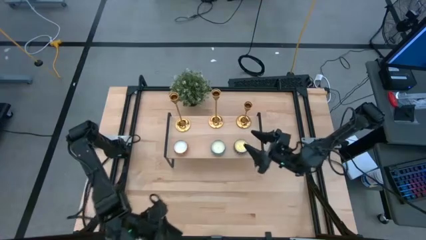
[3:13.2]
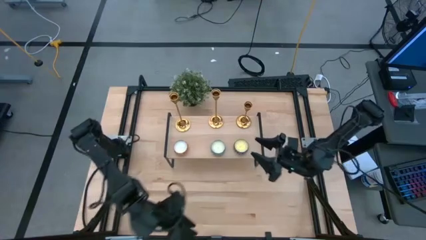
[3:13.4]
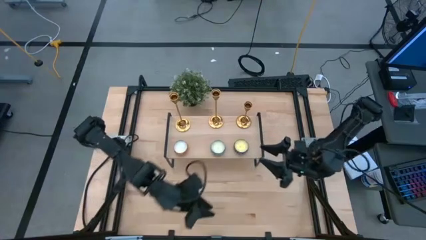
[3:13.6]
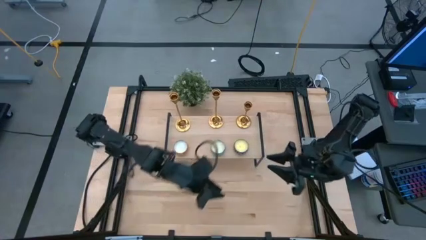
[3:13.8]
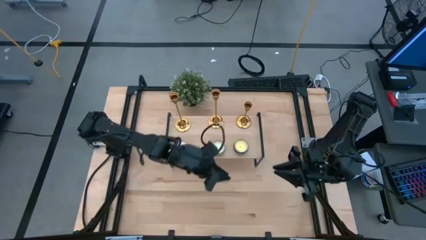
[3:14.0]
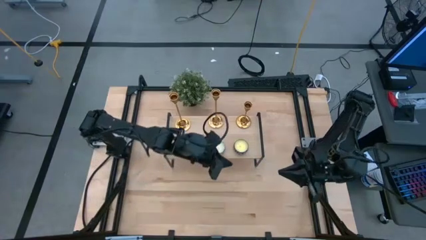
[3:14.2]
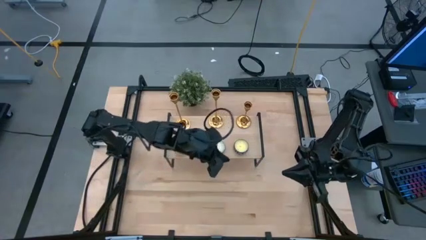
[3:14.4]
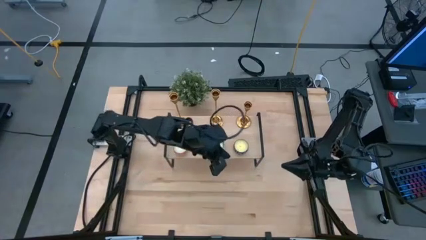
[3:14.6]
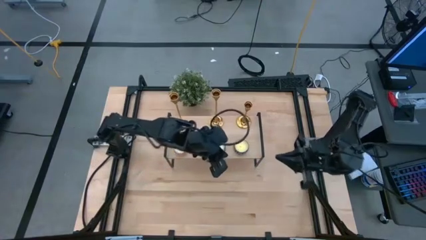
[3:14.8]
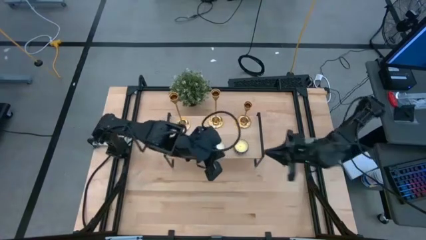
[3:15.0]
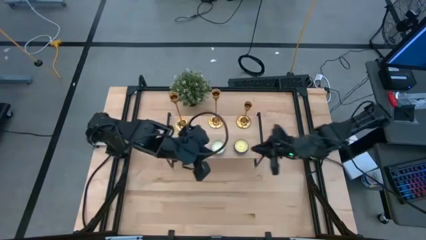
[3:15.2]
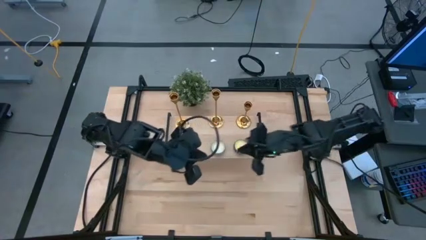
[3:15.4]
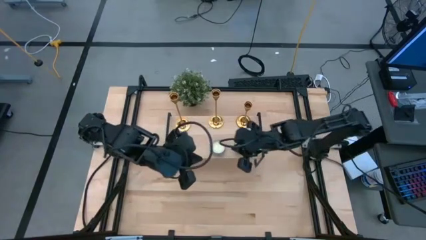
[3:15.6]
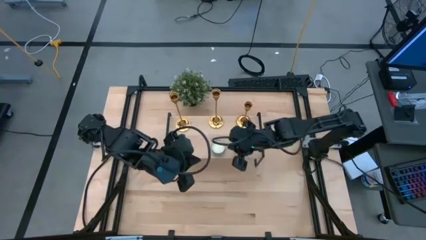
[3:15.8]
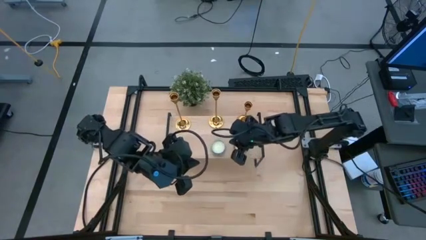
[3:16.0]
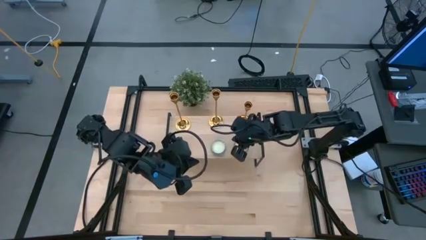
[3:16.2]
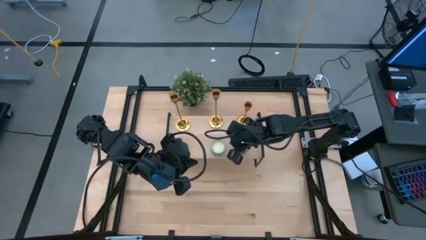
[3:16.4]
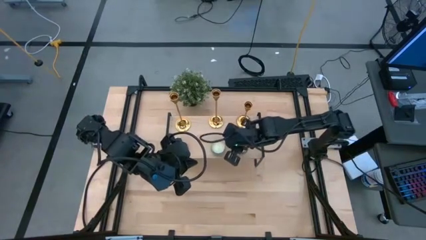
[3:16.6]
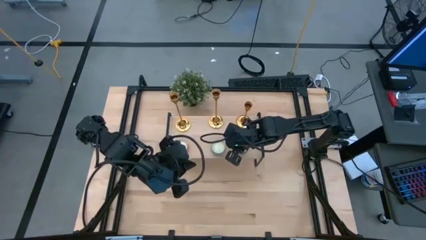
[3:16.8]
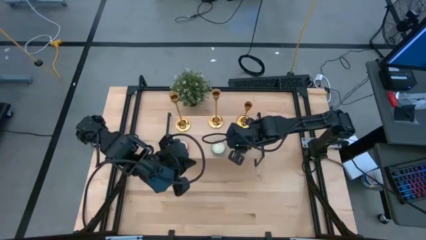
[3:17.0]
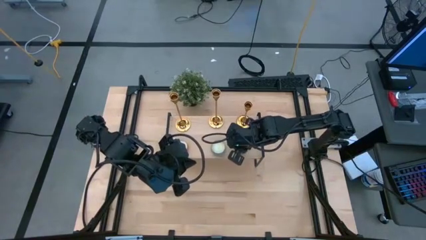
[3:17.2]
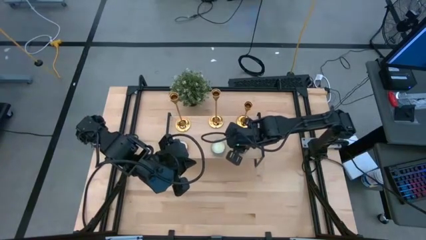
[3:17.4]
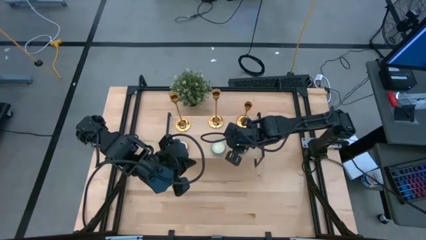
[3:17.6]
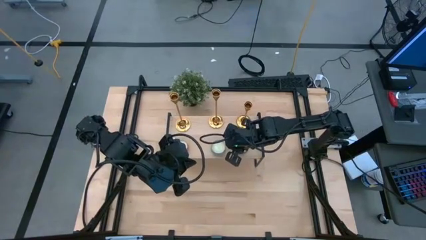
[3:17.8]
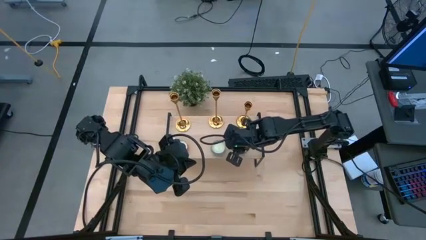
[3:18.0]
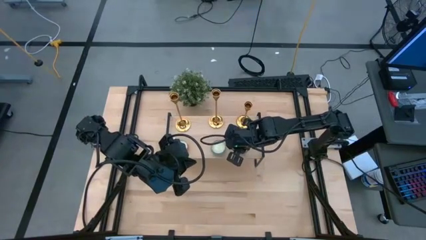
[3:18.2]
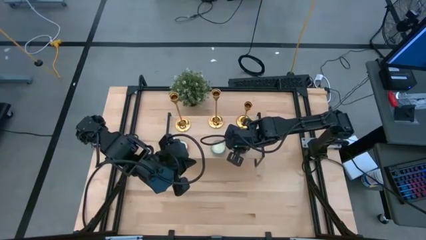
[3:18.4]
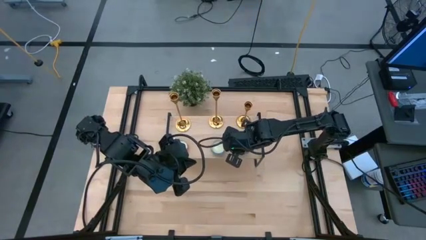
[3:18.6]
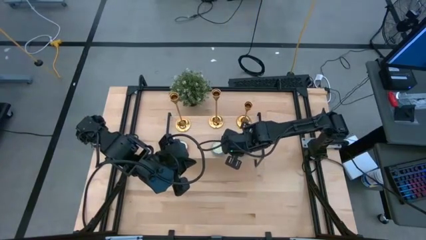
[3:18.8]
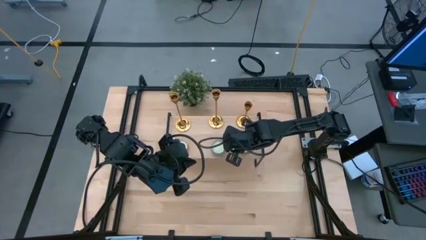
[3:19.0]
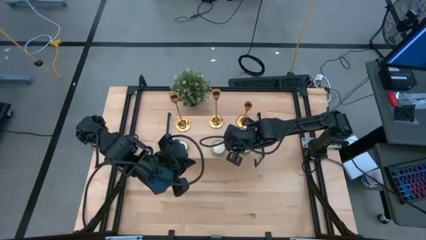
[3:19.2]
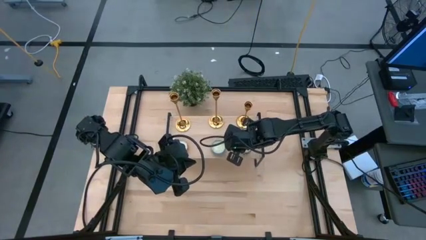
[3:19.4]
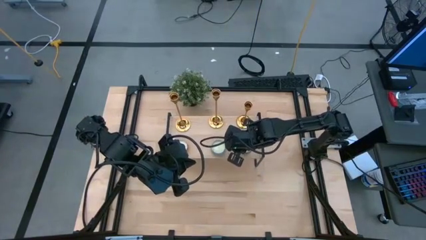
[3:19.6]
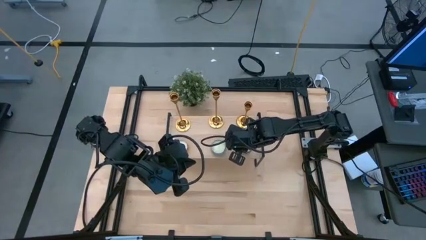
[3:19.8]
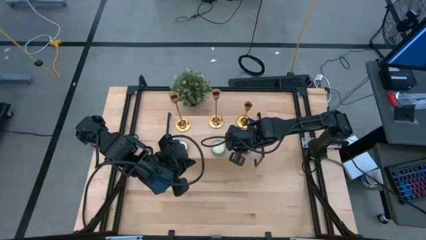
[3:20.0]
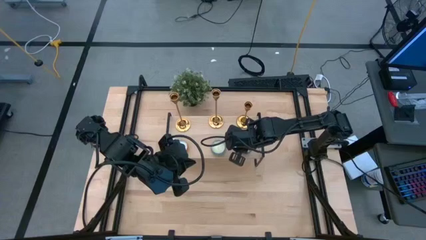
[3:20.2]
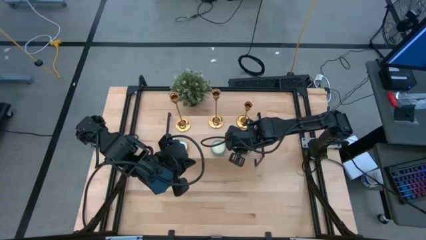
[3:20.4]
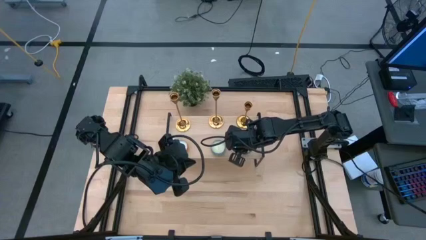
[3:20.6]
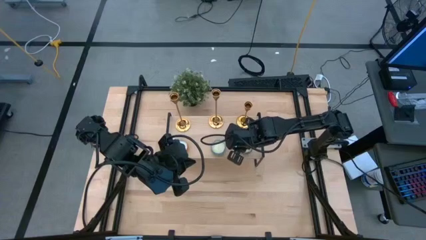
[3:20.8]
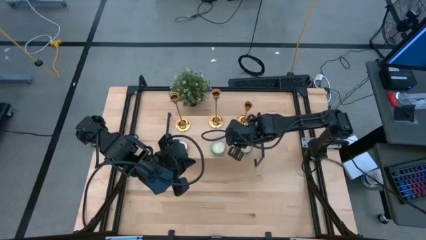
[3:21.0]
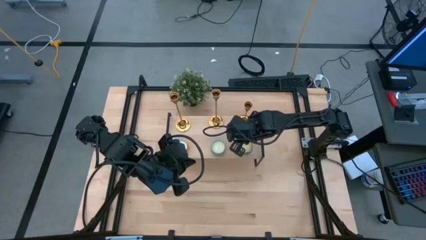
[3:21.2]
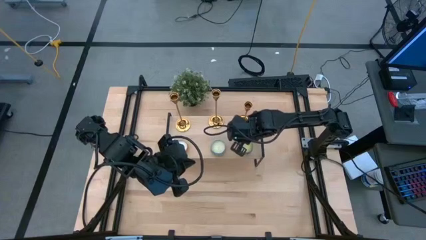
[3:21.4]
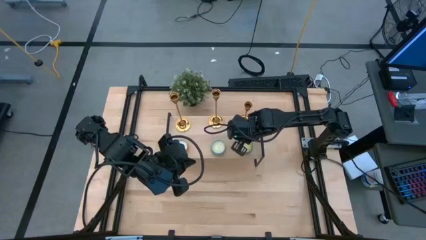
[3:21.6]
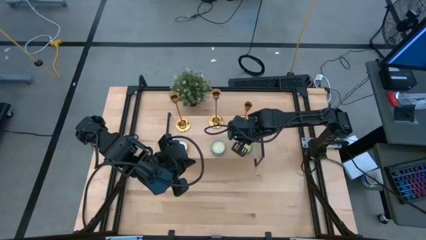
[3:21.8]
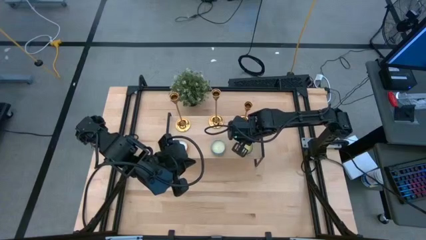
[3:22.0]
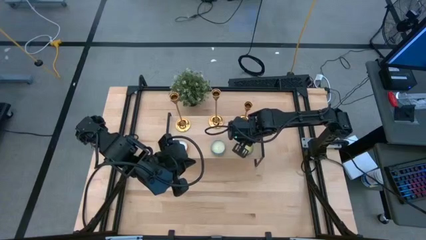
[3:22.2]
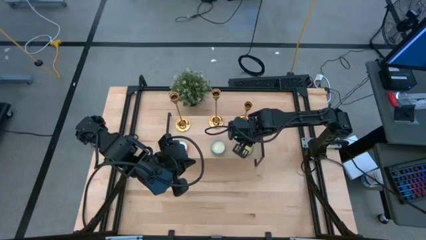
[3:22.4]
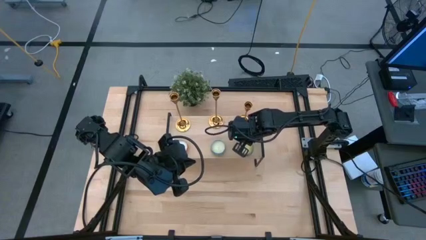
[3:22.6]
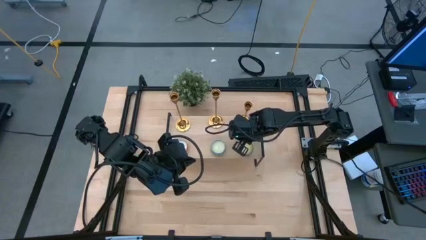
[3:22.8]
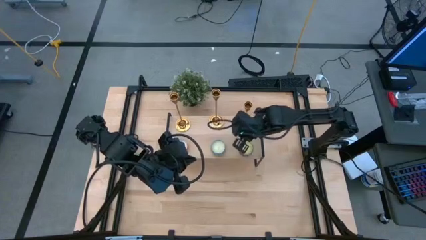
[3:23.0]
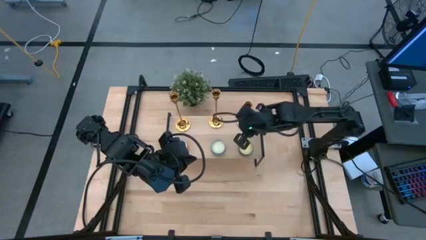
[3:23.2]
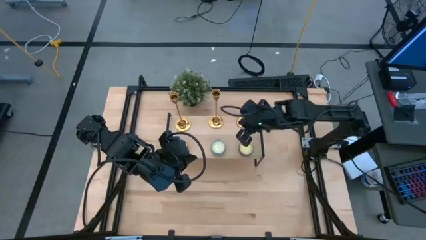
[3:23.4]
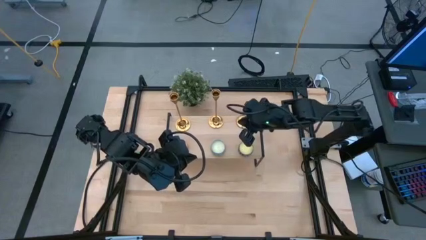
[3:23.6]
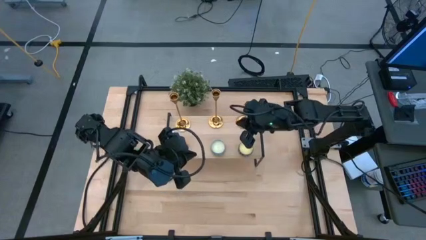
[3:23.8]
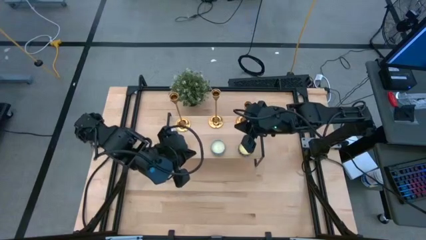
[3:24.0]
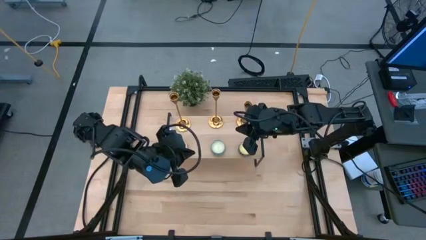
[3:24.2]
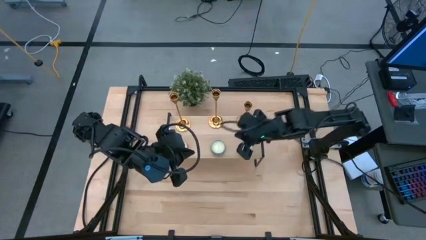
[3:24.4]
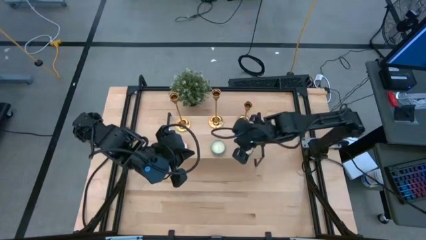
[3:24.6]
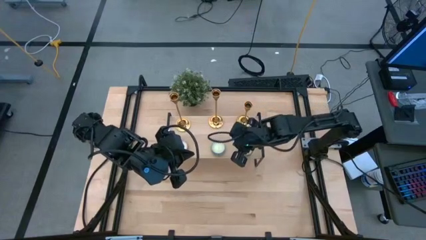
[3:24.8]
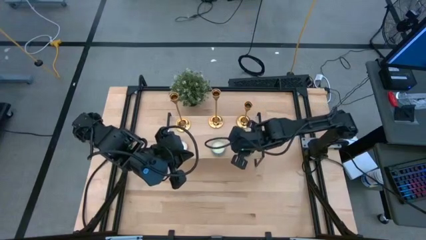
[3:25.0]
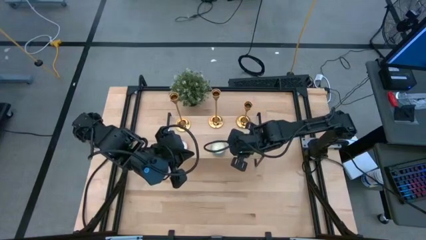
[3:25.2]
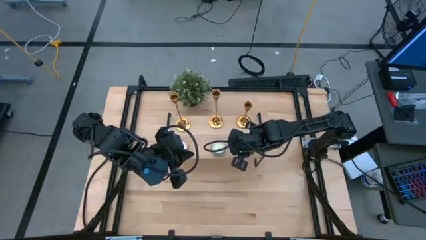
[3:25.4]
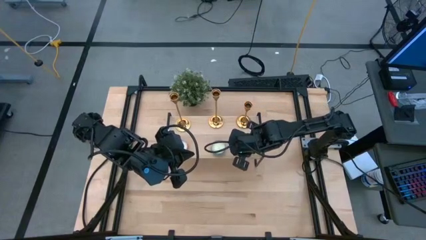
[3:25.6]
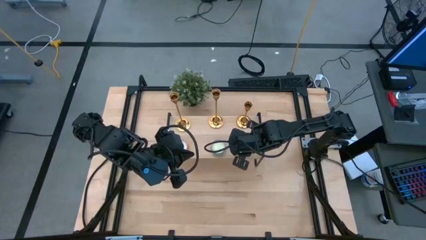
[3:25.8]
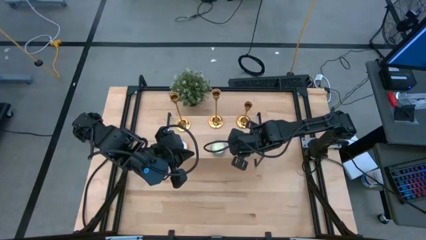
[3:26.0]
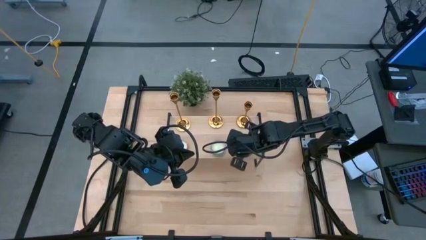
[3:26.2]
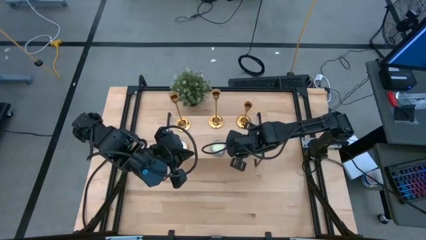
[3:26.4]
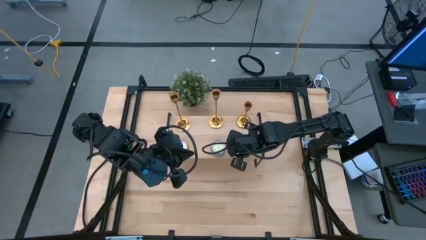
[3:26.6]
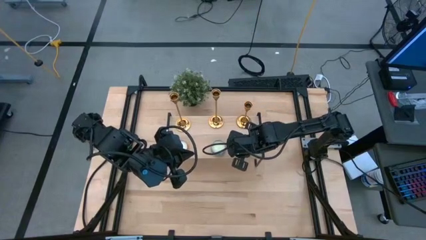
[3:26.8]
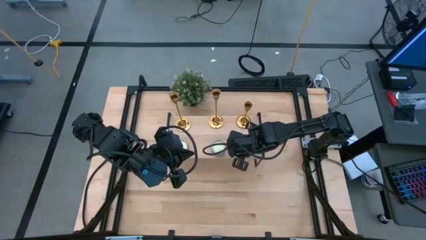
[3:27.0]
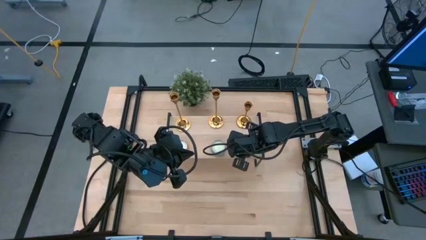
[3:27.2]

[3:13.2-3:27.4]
Task: Stock candles and holders on shelf
Align the red scented candle with the other scented candles on the shelf
